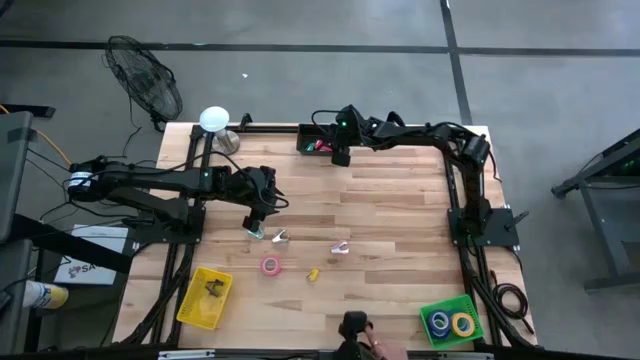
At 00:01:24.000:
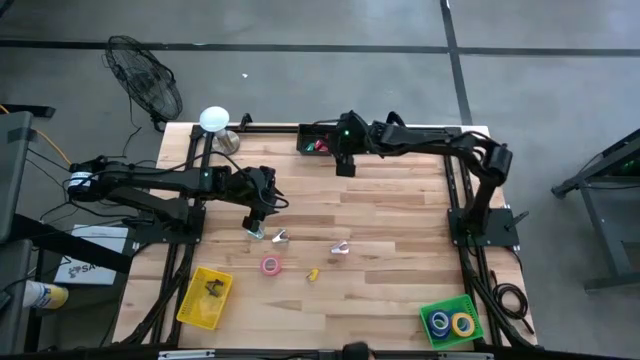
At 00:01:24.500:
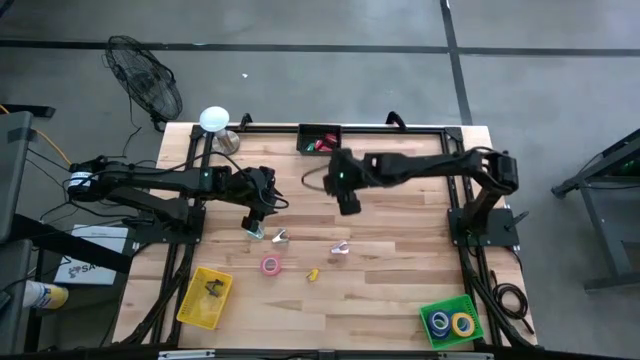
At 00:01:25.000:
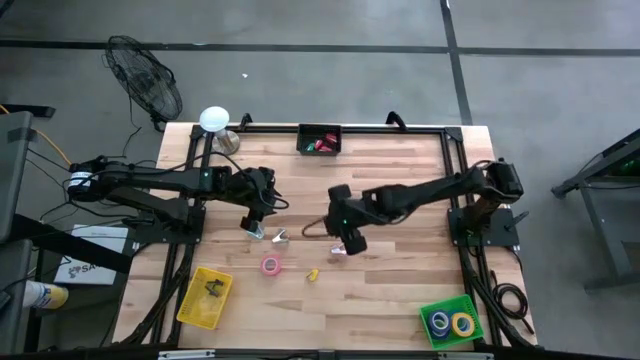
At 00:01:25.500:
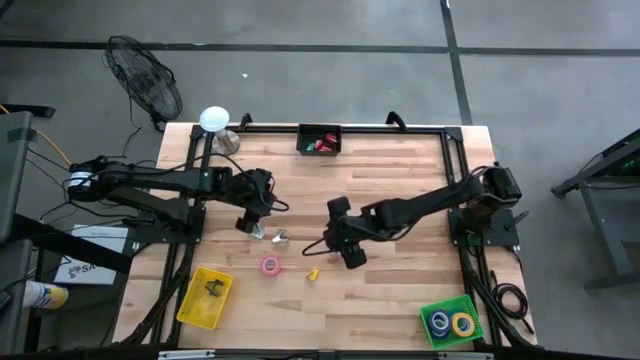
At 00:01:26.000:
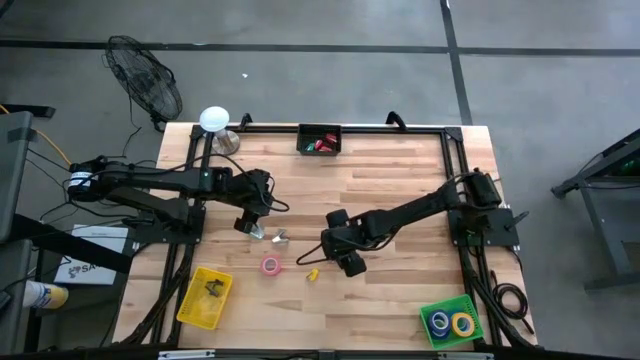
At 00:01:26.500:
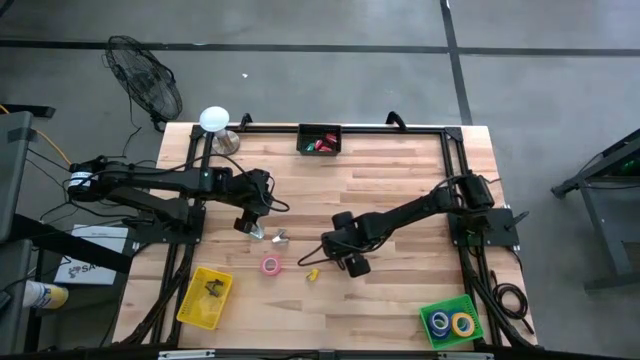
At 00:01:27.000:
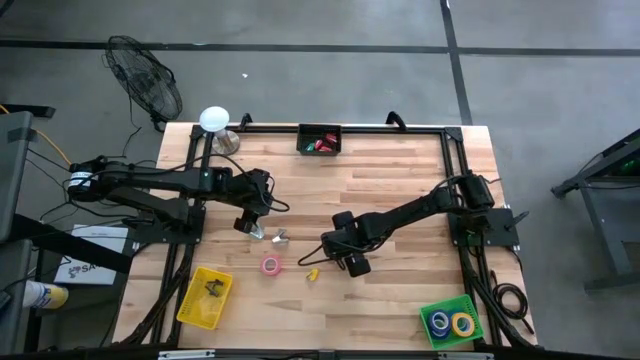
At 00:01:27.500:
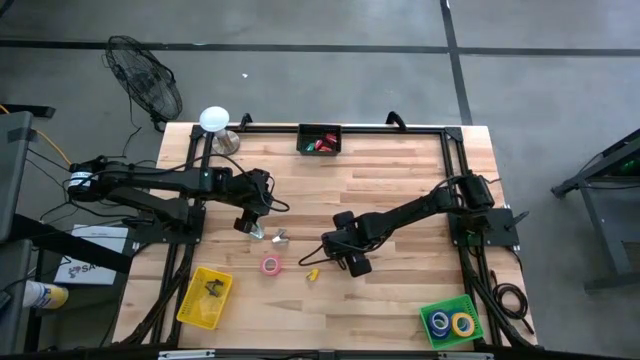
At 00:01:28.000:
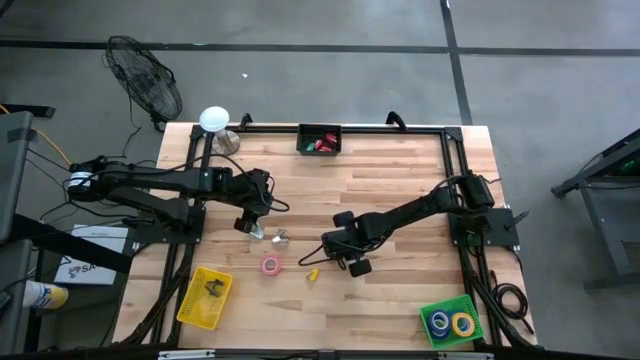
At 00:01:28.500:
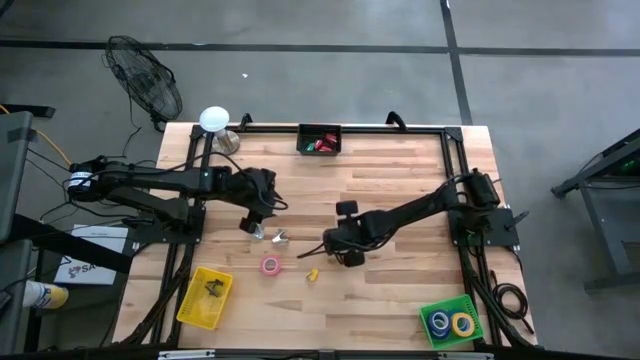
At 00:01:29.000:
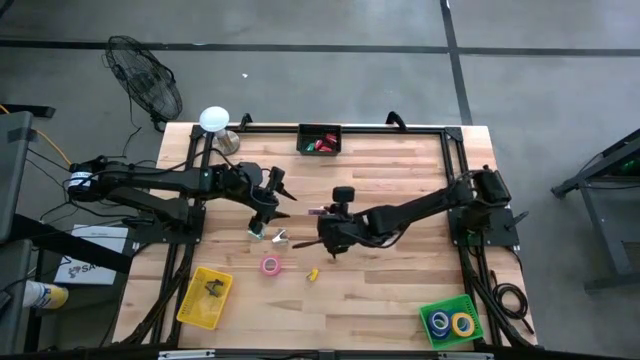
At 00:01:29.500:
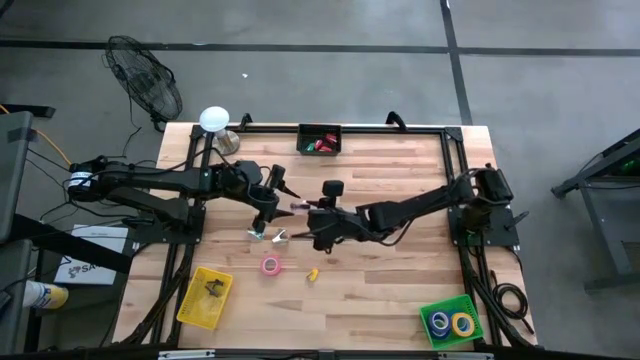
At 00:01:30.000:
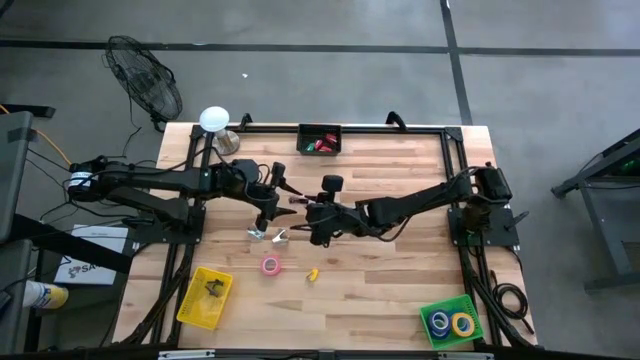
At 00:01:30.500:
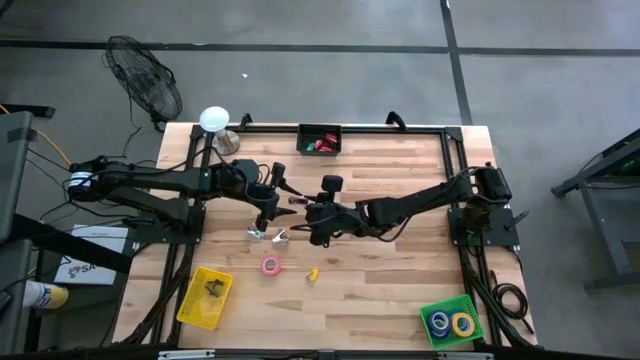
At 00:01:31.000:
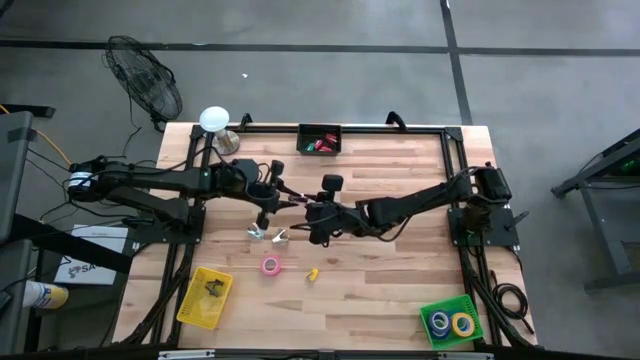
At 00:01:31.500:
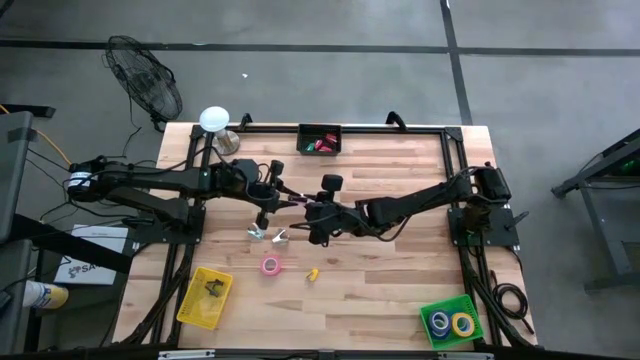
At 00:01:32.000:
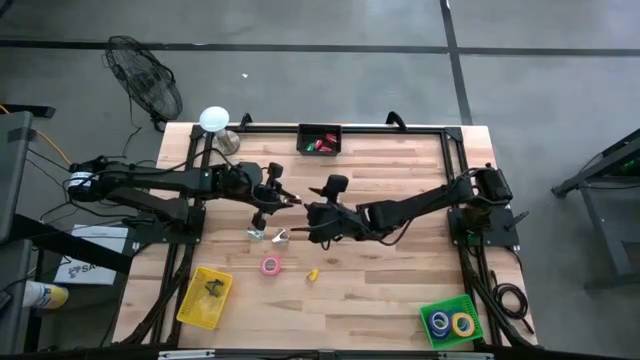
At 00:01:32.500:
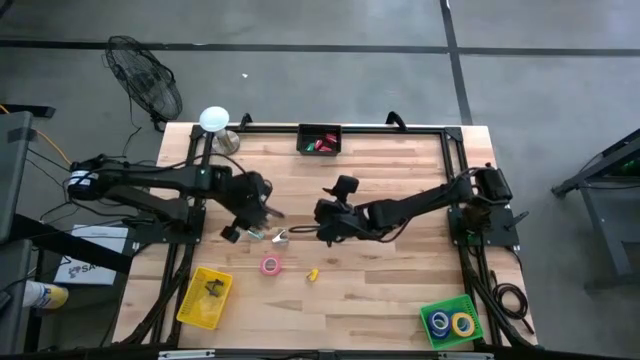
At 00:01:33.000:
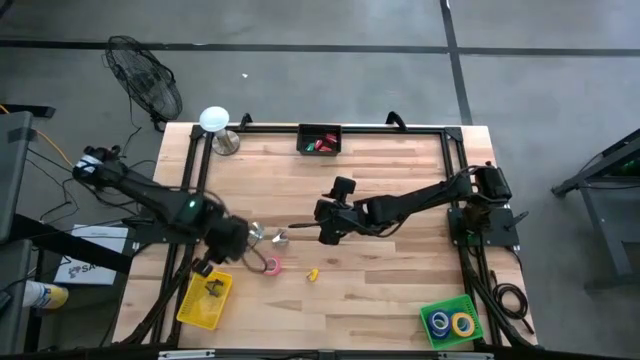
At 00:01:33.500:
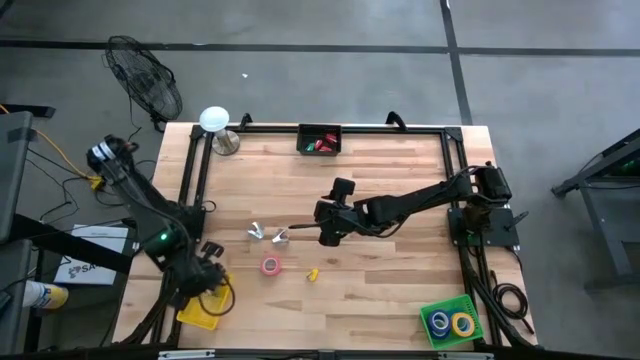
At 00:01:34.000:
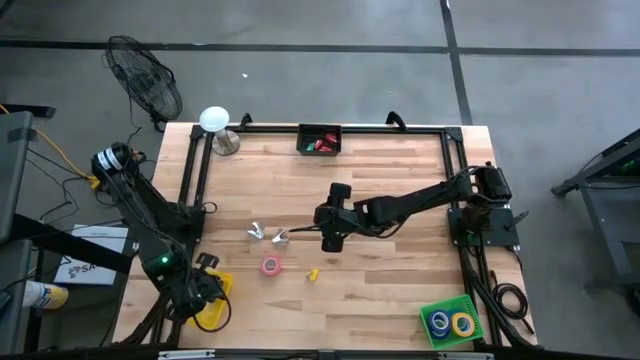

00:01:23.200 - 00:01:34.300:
Task: Pick and place Stapler, Stapler remover, tape
Put the pink staple remover into the yellow bin

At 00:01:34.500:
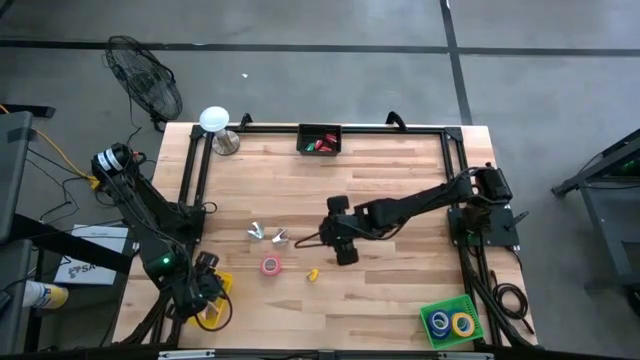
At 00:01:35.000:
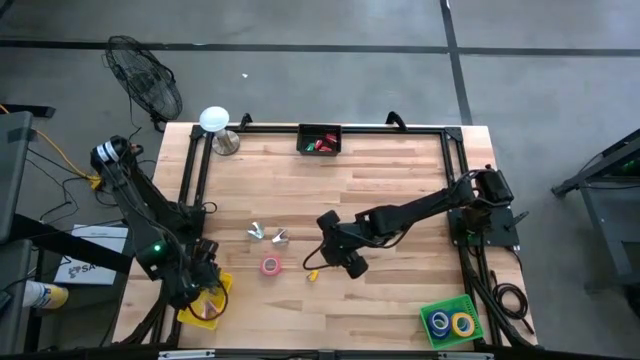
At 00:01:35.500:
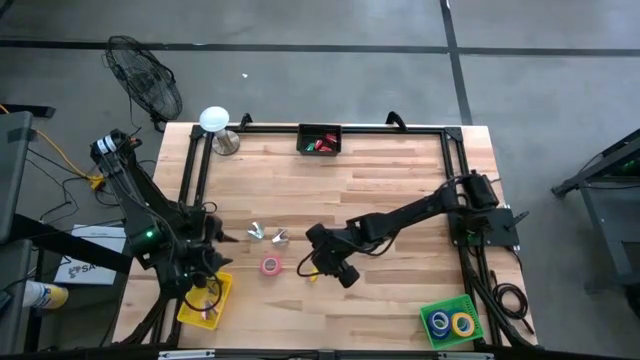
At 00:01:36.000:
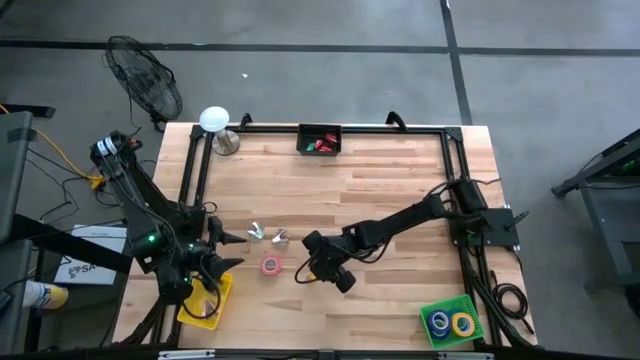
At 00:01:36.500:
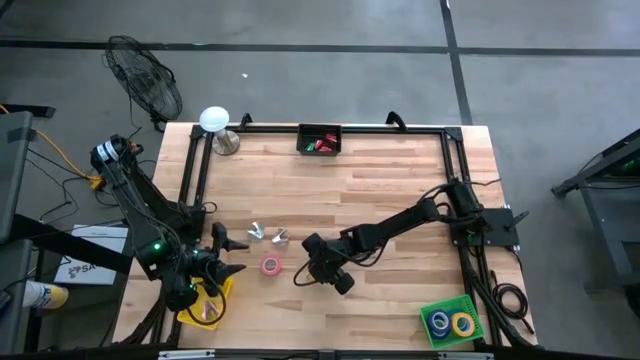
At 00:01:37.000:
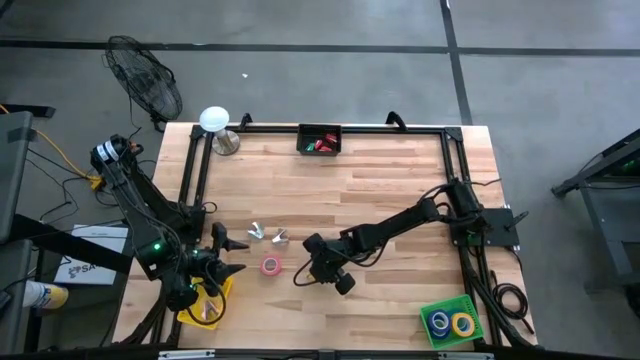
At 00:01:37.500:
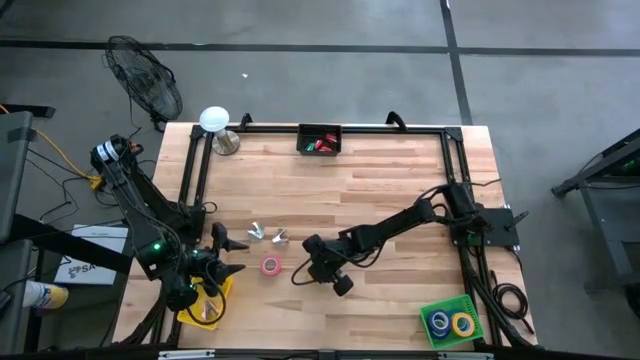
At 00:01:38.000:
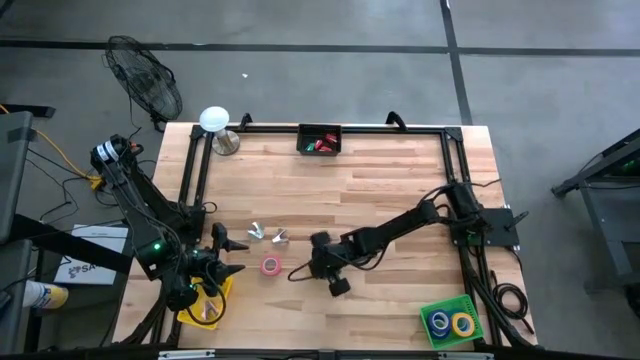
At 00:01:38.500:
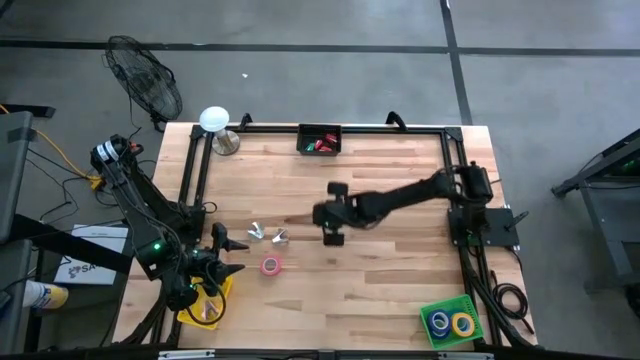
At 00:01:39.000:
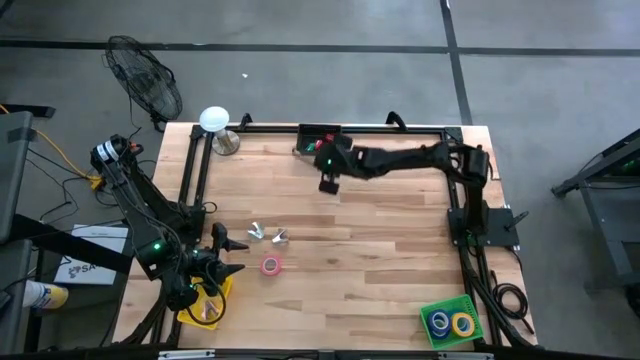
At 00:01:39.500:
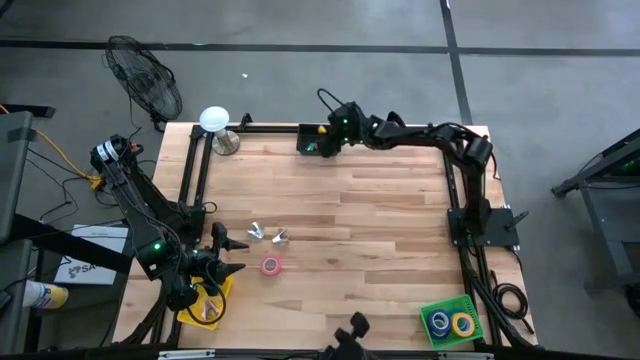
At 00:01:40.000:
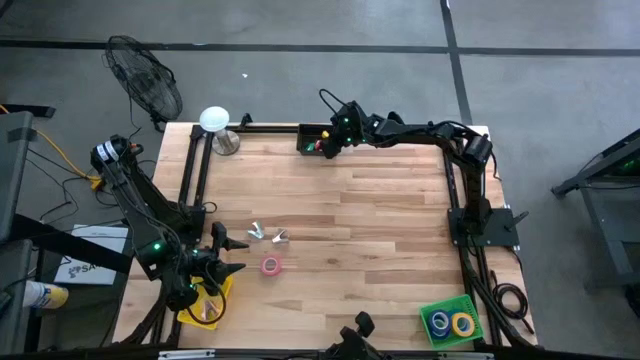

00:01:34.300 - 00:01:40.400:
Put the yellow stapler into the black bin

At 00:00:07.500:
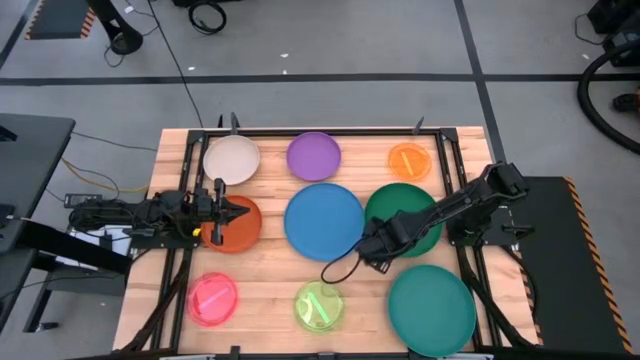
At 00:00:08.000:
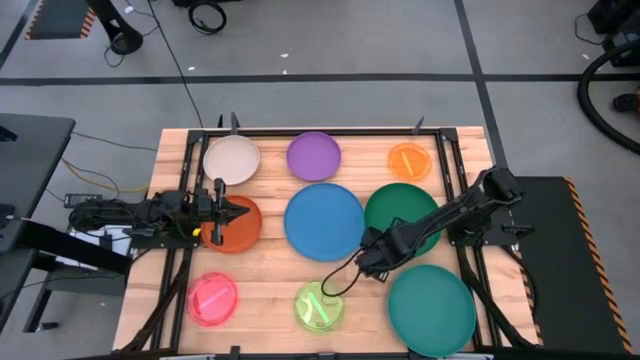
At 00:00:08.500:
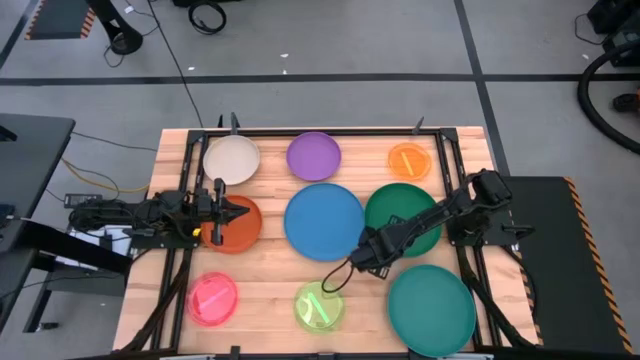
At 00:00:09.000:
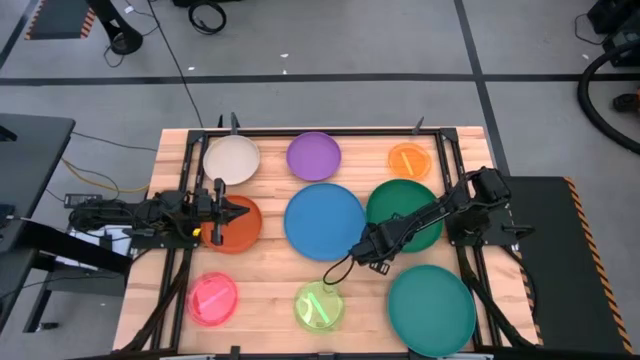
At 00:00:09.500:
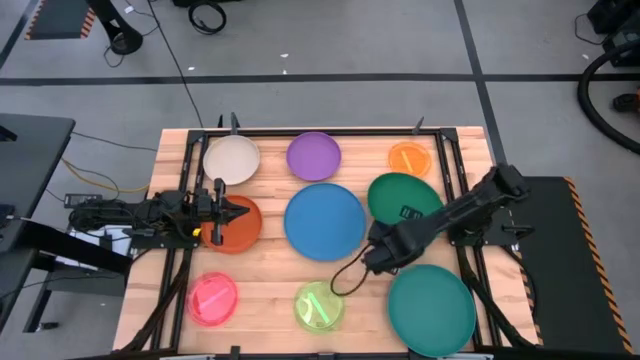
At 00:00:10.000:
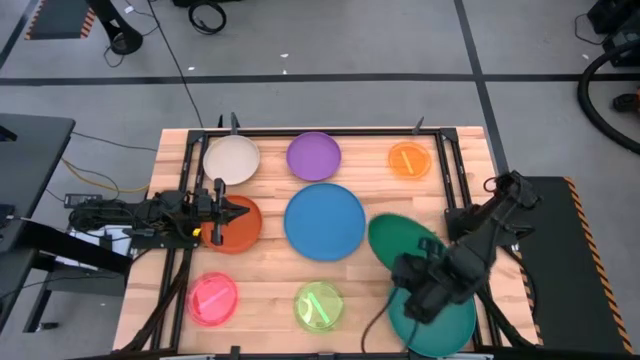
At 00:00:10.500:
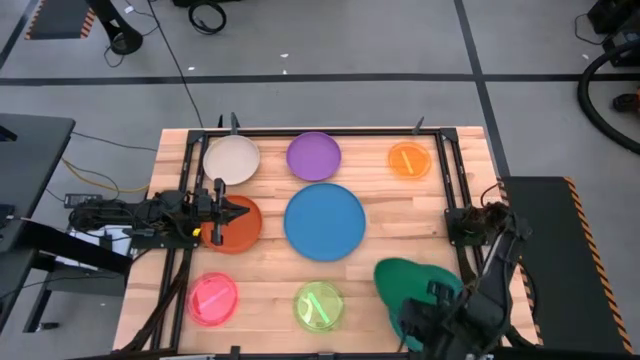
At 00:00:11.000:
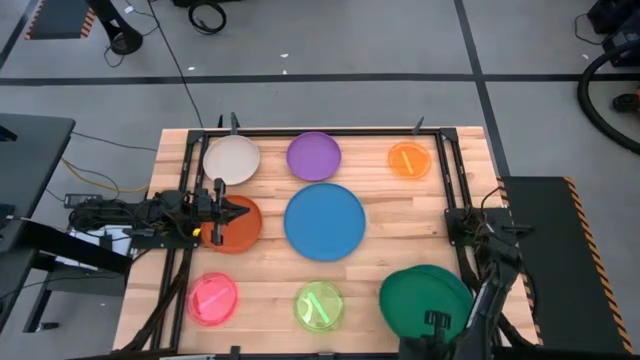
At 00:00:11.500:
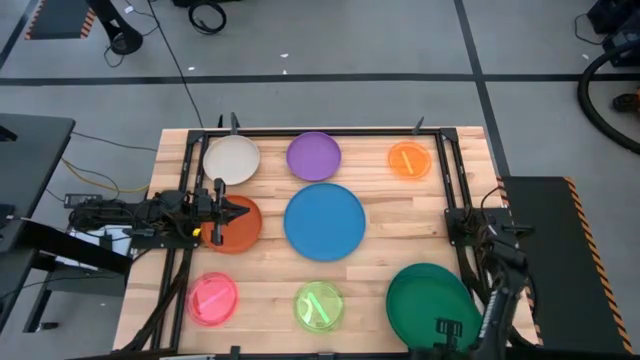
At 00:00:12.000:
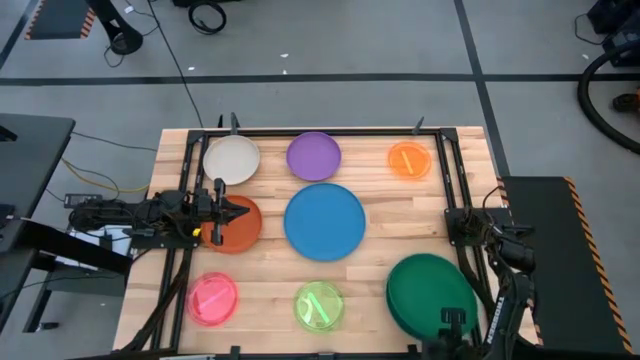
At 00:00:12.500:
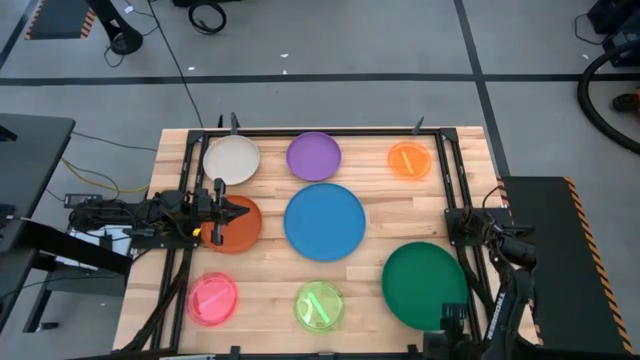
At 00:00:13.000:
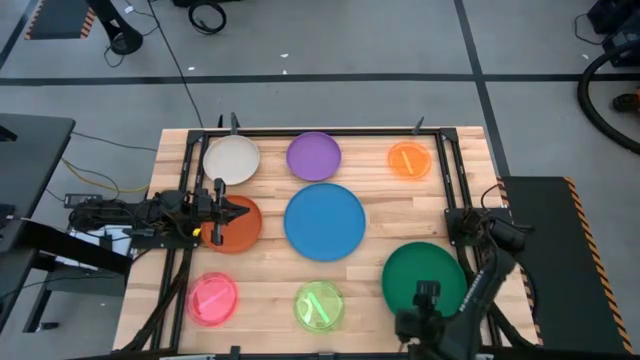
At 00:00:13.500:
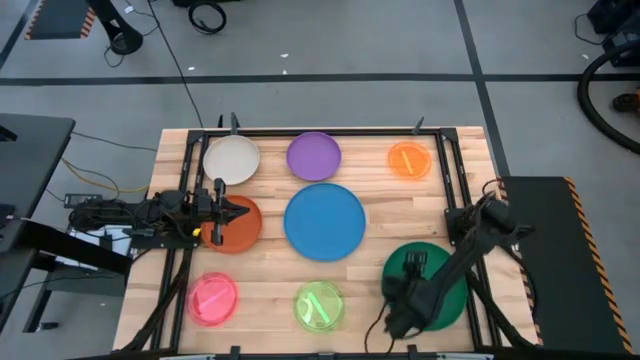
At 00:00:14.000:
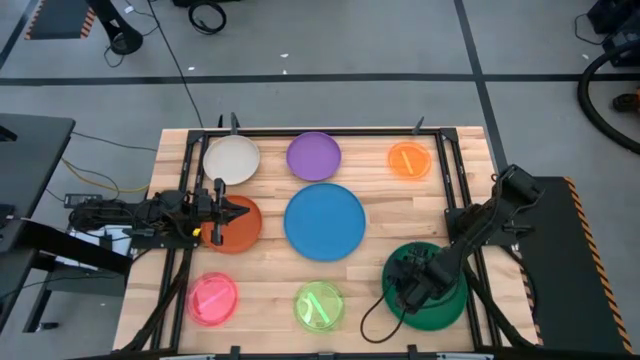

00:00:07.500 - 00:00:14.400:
Task: Stack plastic plates
Stack the green plate on top of the light green plate
